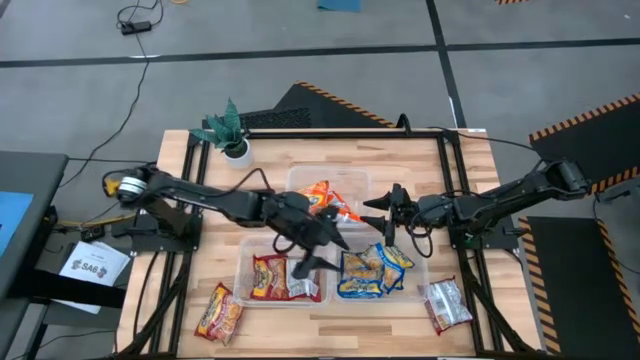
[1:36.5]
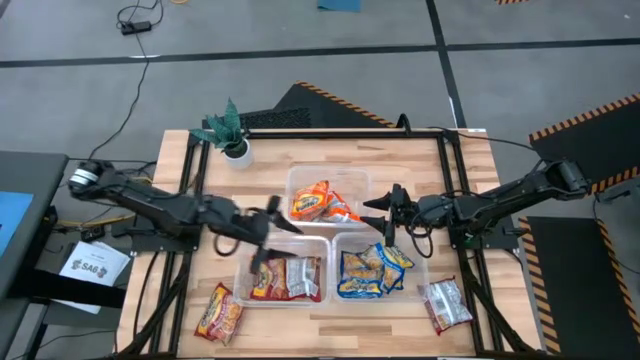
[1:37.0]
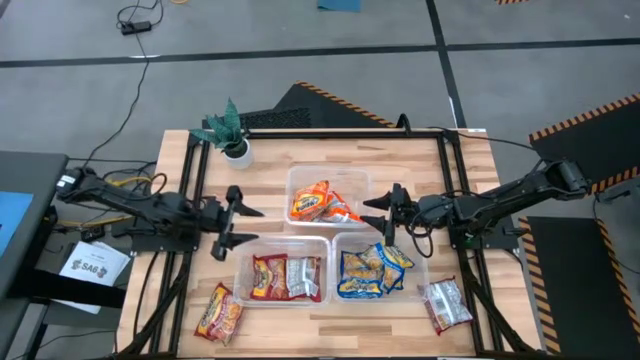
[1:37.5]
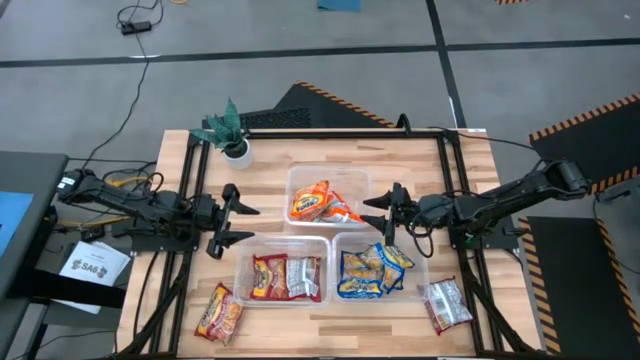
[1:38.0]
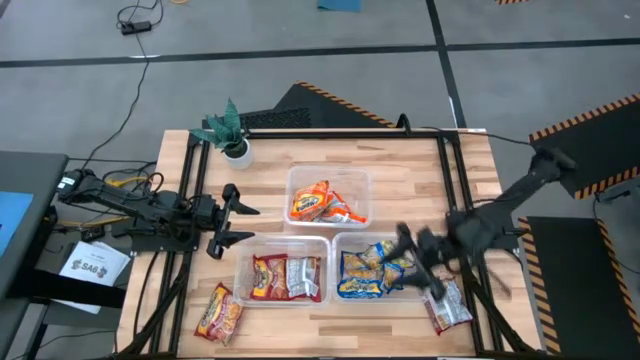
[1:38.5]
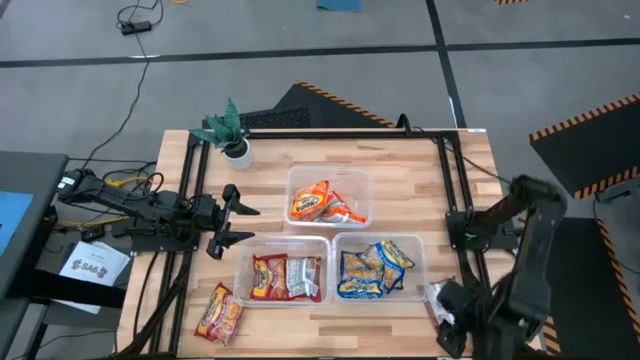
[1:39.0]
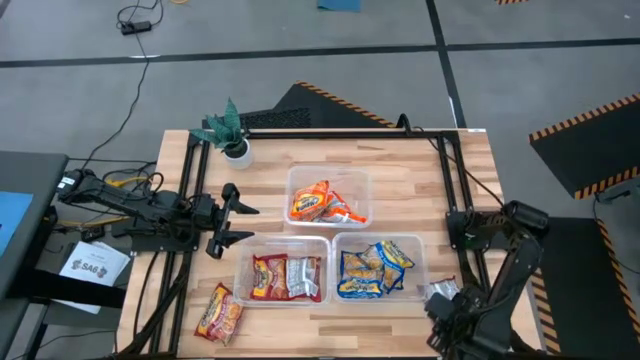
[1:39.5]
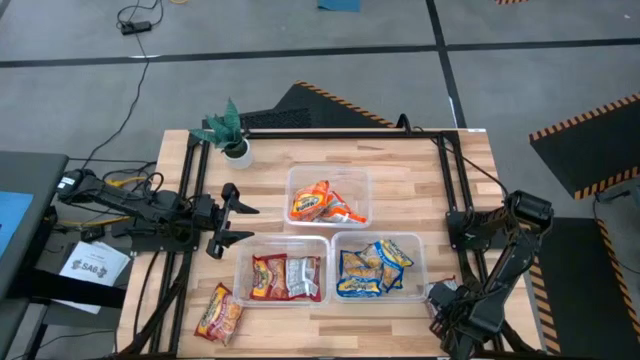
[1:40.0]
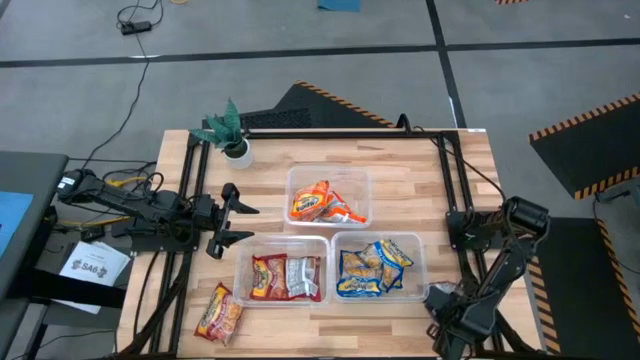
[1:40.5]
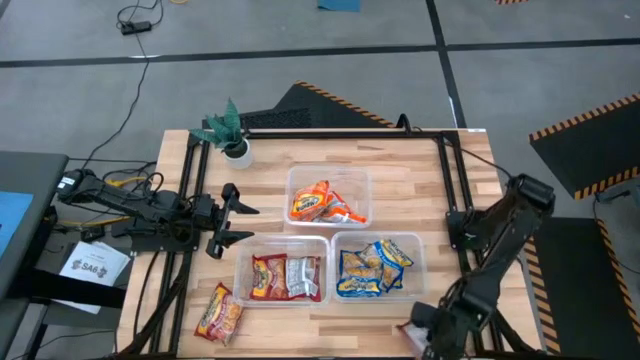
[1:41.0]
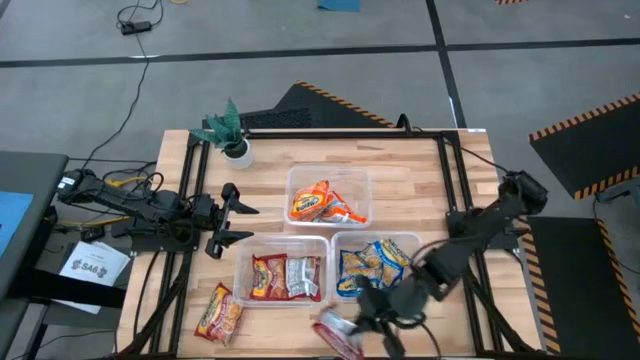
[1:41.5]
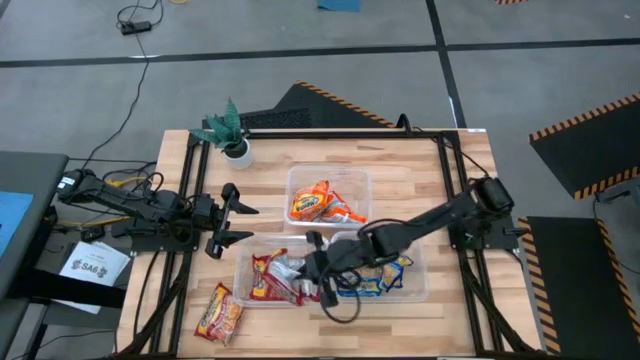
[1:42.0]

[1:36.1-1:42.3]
Task: Sort Maruchan noodles
Put the red noodle pack into the bottom left transparent bin

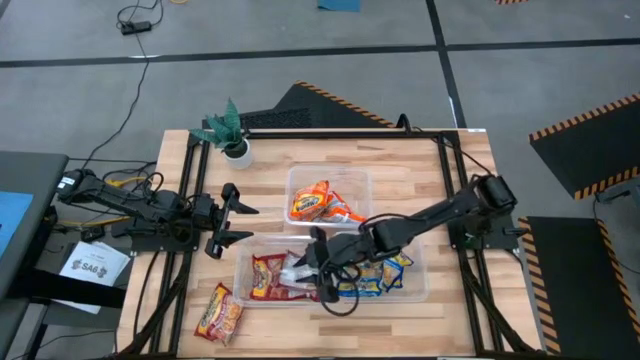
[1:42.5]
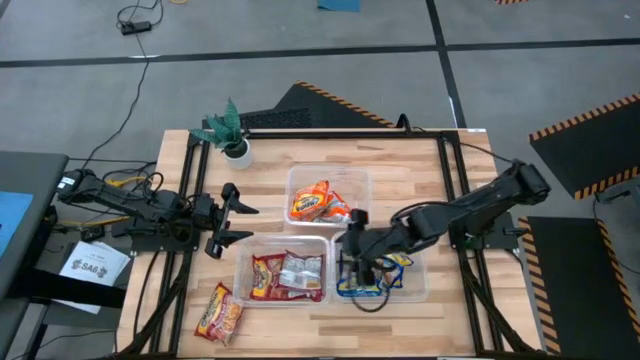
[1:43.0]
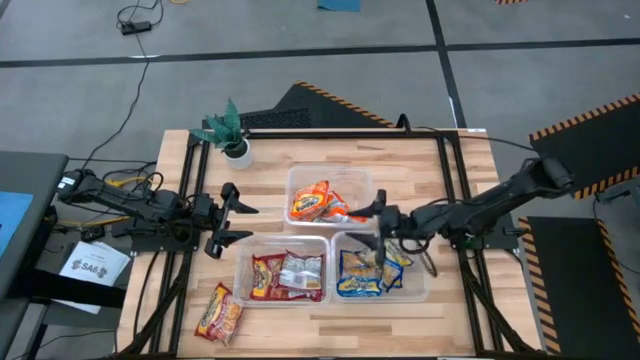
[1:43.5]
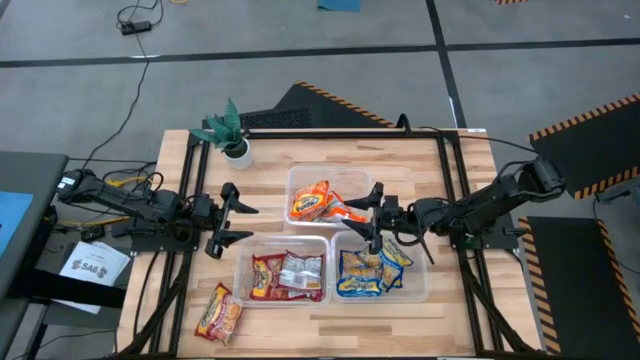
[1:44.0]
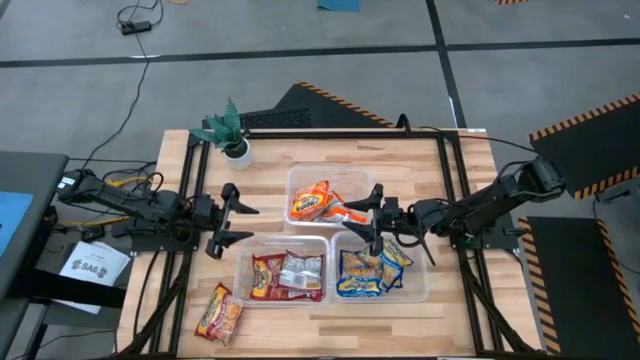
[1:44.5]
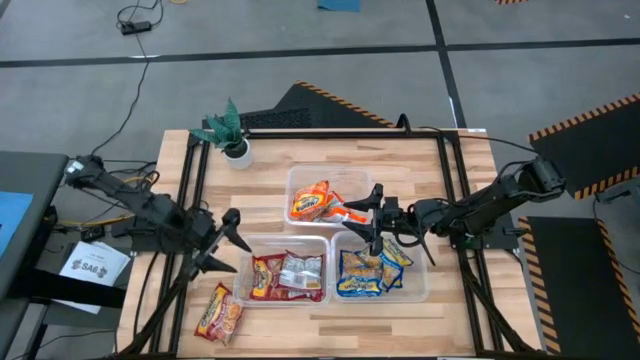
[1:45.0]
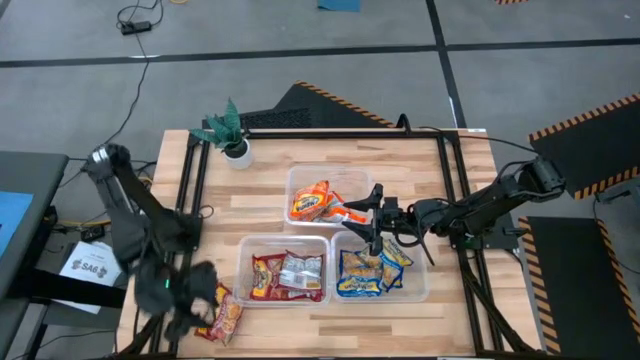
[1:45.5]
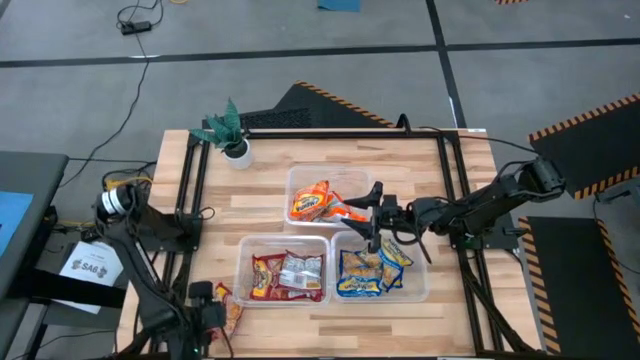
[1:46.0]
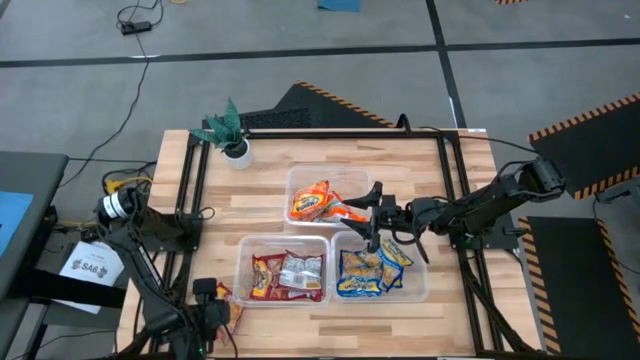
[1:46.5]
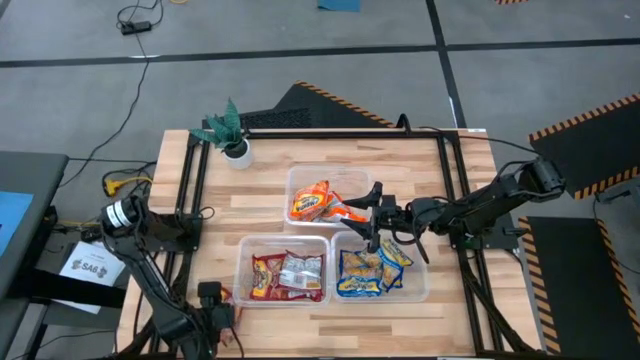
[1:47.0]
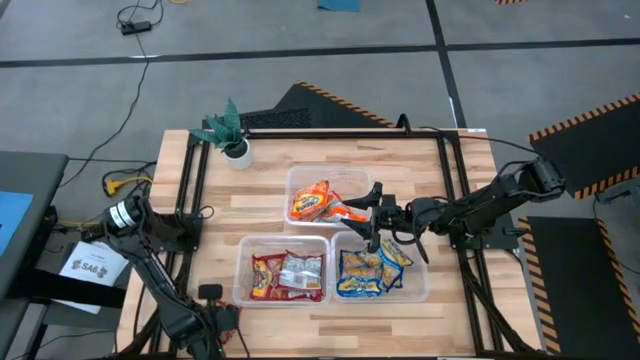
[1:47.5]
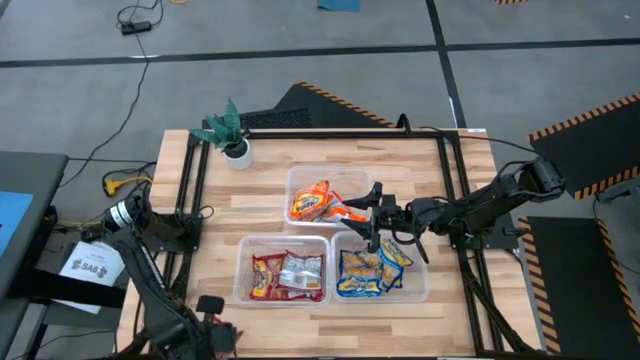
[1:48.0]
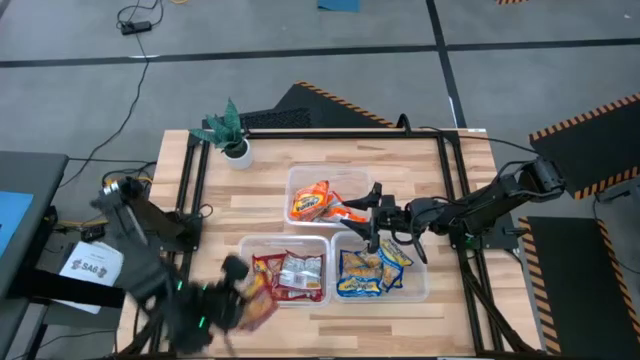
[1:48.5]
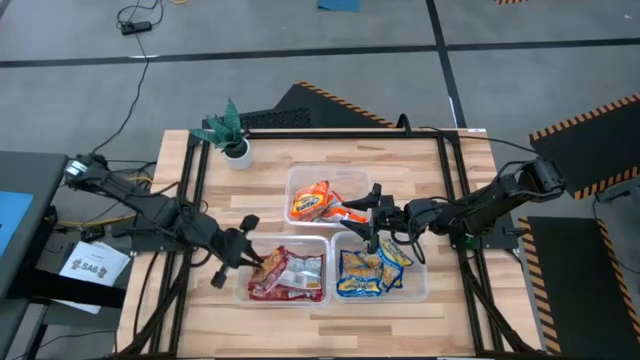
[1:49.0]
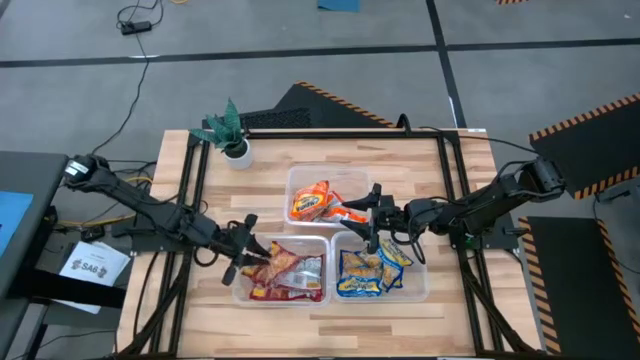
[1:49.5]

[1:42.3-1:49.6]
Put the red noodle pack into the bottom left transparent bin

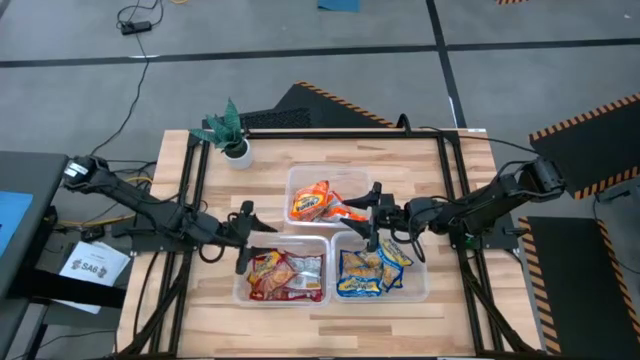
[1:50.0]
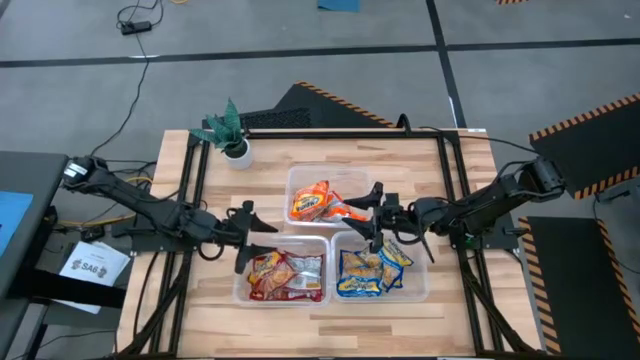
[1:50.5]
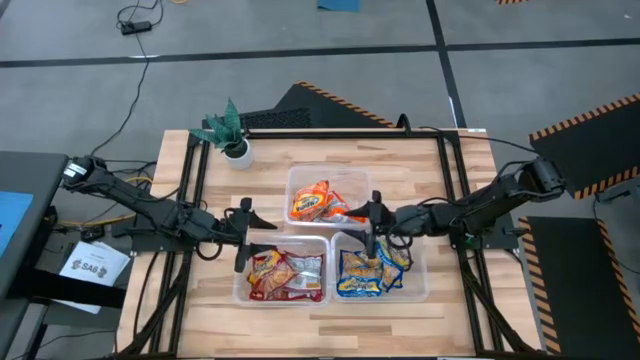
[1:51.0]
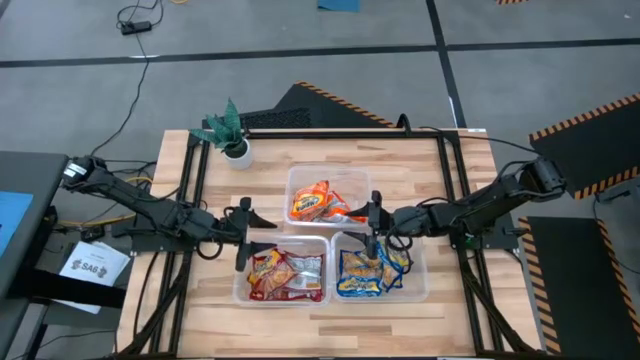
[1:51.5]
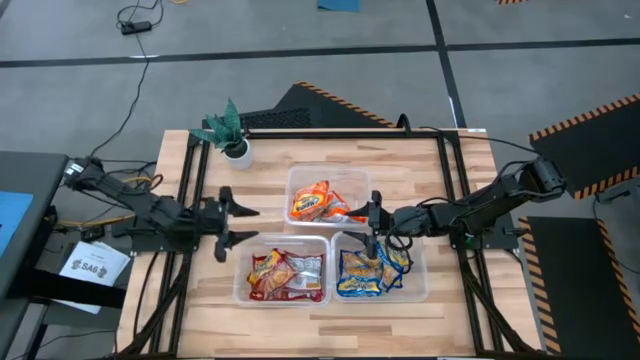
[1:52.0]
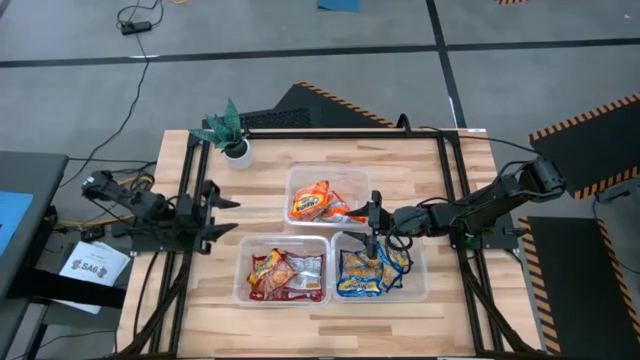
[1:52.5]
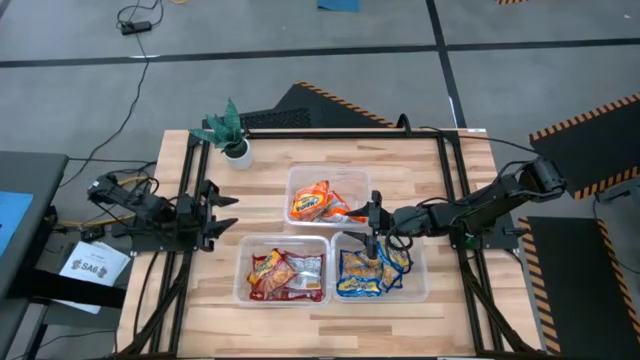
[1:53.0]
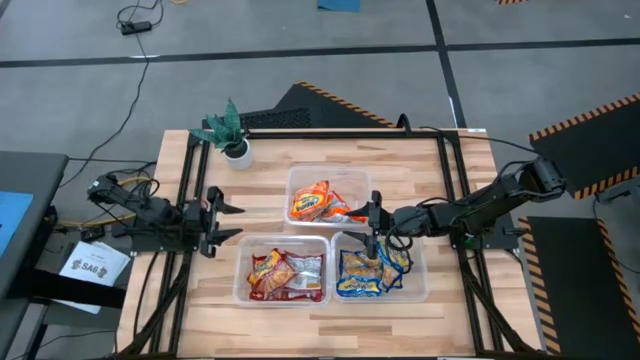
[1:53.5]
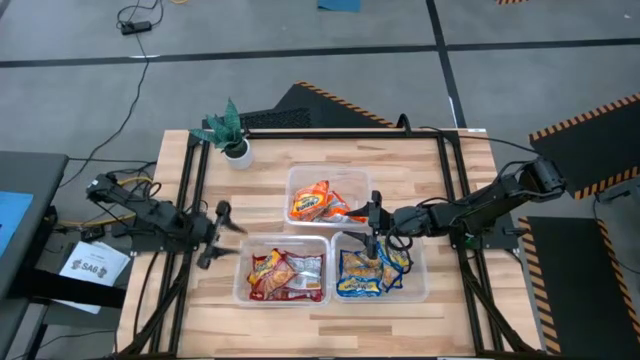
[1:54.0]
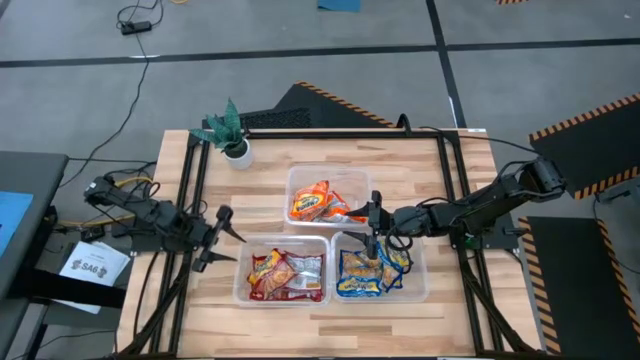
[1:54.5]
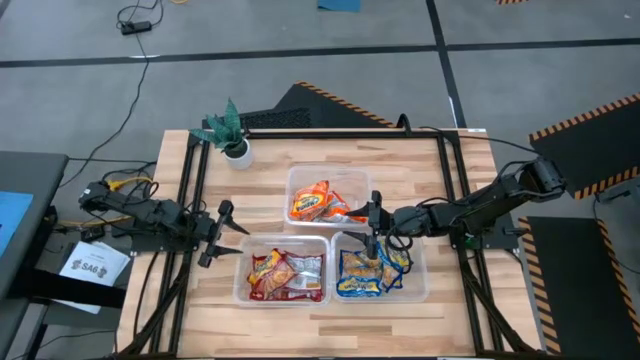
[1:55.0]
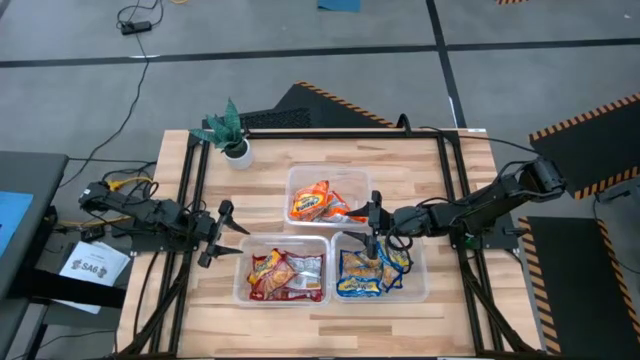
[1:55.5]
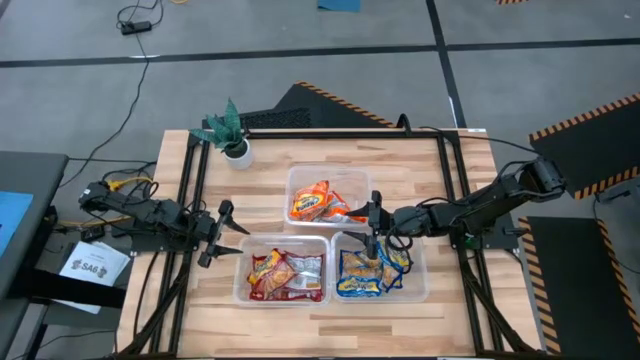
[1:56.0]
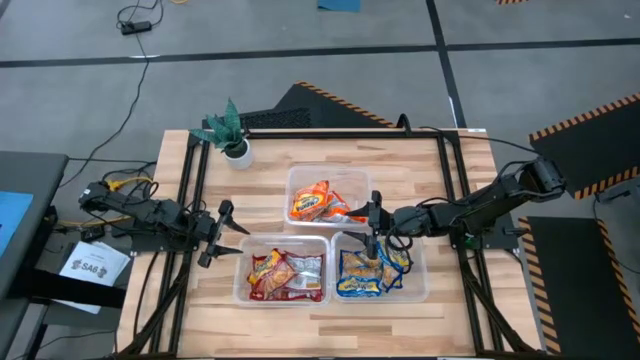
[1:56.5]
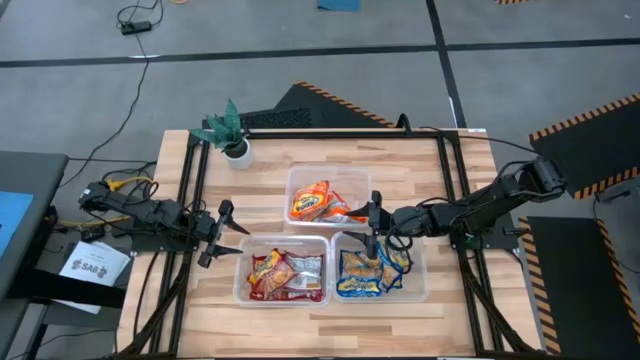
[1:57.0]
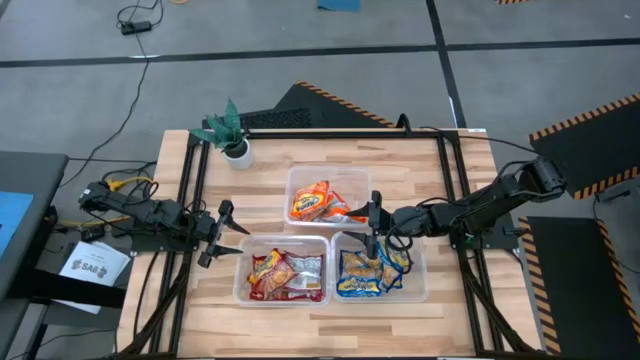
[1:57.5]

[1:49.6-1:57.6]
Return to Home Position
